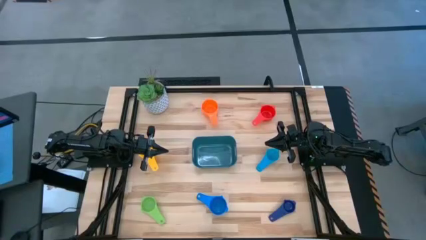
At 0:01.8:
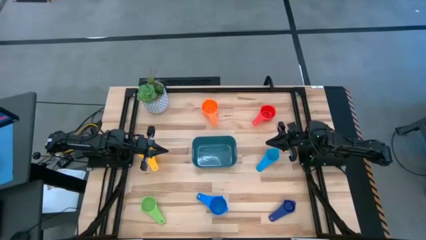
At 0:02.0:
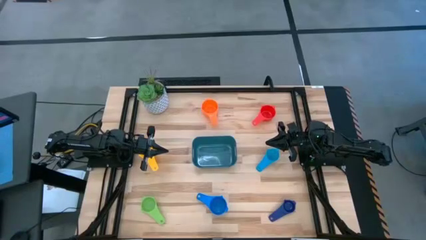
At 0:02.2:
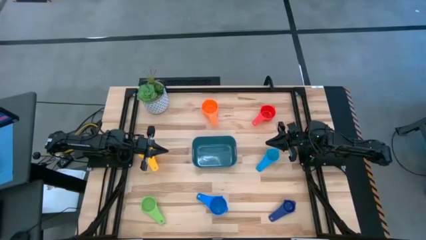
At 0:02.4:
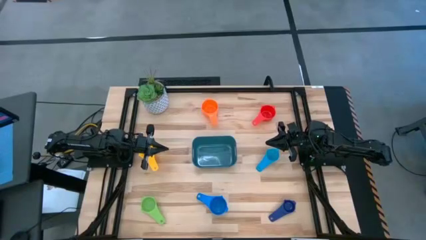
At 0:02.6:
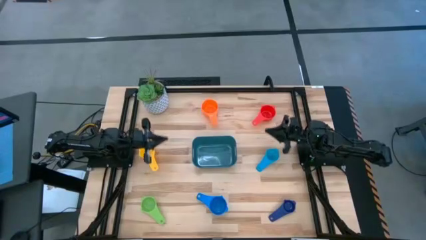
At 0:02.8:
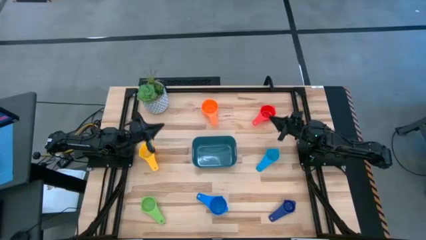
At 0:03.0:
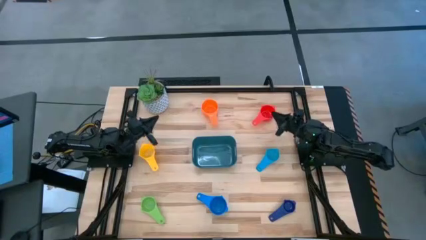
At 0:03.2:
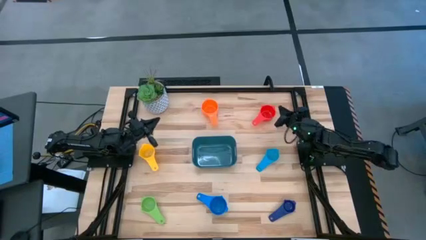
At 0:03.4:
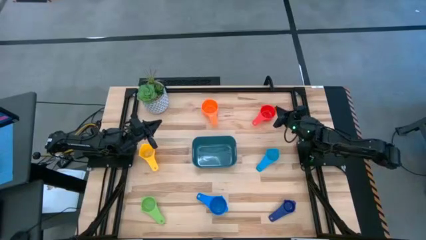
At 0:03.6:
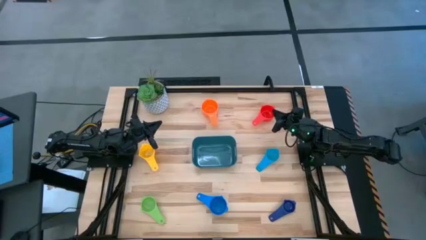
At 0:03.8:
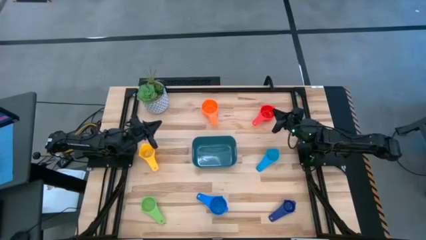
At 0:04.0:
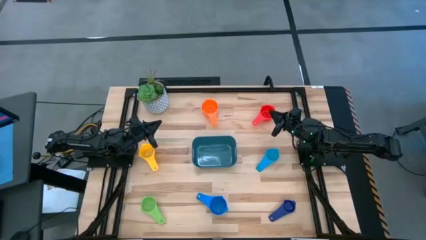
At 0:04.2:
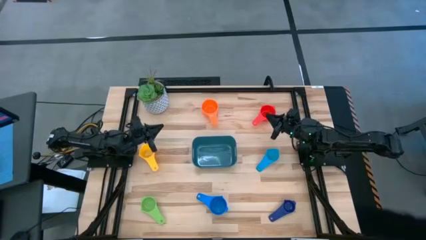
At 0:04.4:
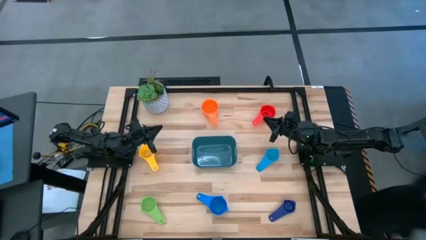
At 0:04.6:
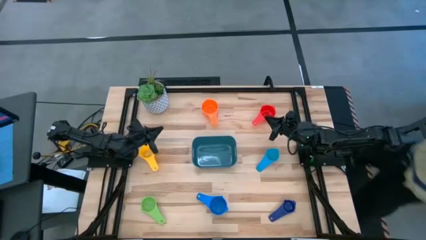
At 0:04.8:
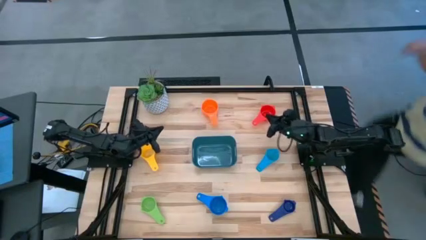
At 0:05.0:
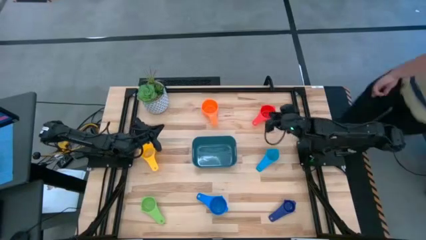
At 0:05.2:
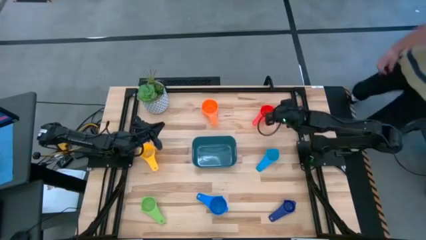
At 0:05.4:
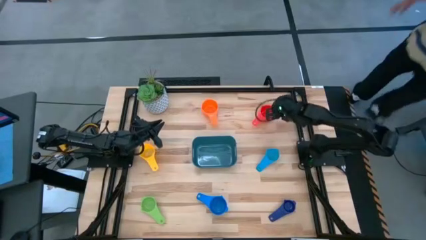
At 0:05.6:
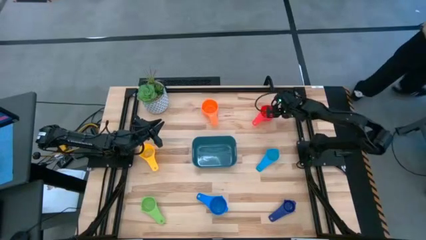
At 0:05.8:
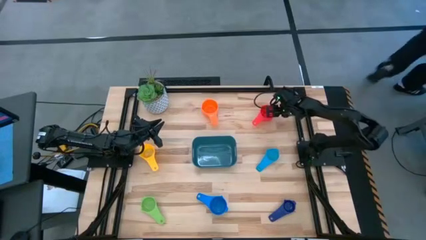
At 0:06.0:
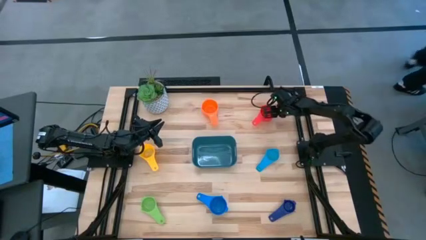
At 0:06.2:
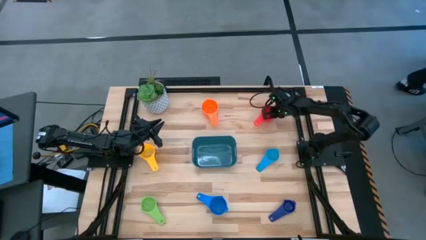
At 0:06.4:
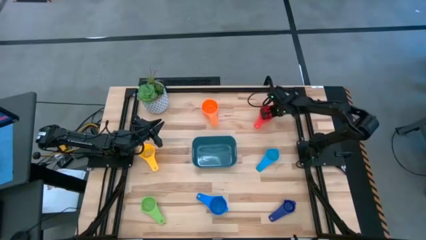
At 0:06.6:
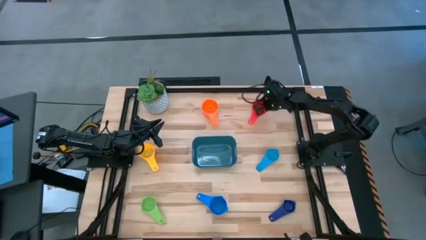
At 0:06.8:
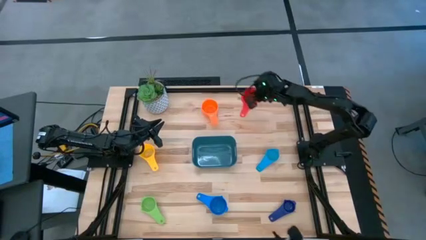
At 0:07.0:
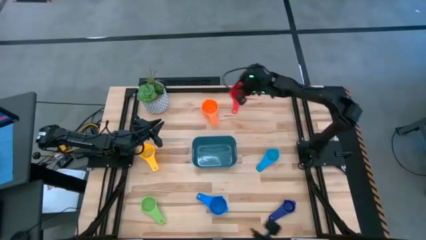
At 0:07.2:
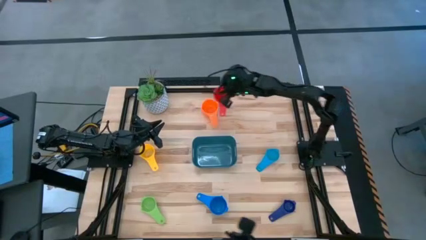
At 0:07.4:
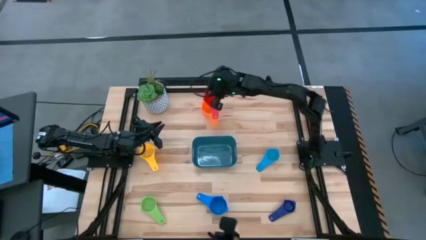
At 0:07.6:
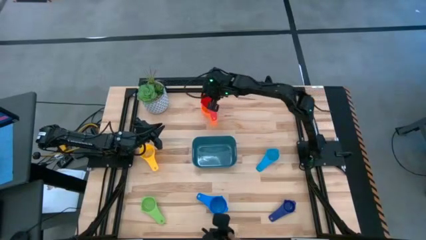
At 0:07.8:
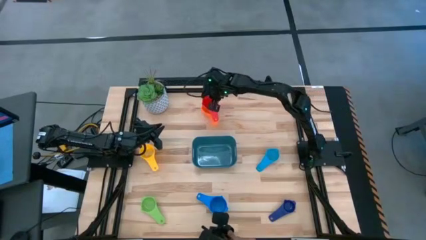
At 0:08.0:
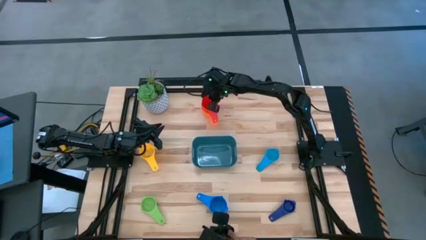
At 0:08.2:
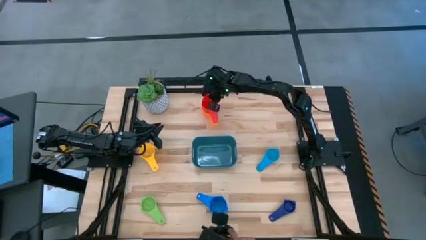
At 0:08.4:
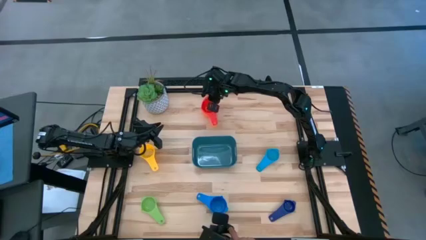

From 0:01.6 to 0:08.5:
Task: Nest measuring cups in basket
Stack the red measuring cup on top of the orange measuring cup

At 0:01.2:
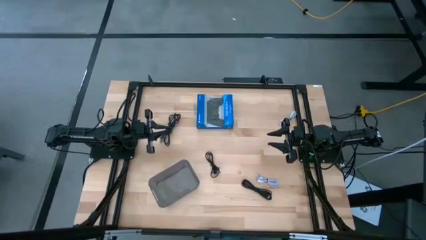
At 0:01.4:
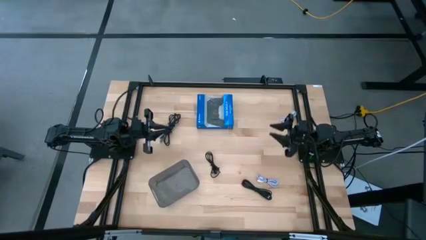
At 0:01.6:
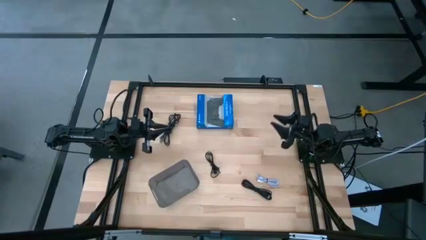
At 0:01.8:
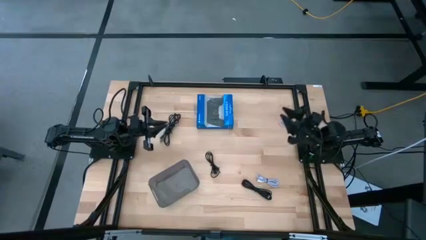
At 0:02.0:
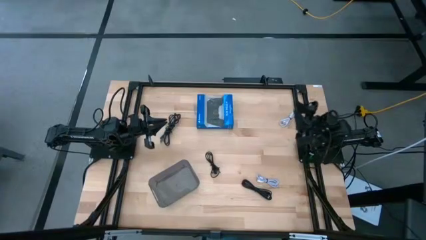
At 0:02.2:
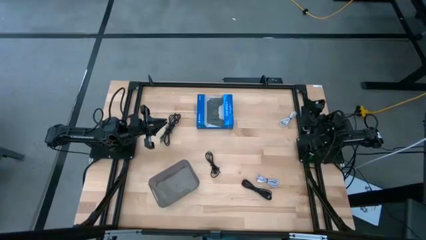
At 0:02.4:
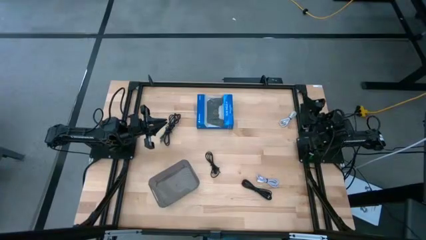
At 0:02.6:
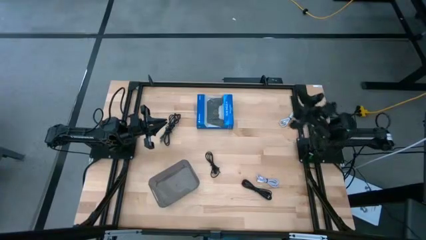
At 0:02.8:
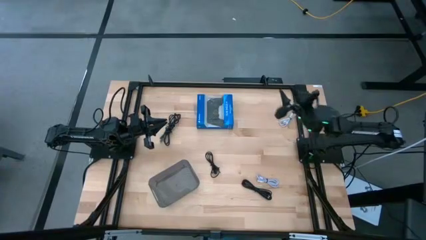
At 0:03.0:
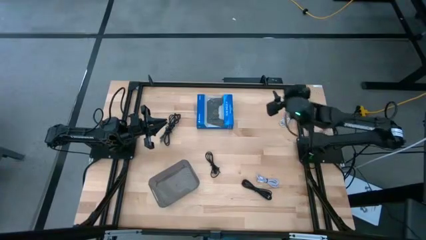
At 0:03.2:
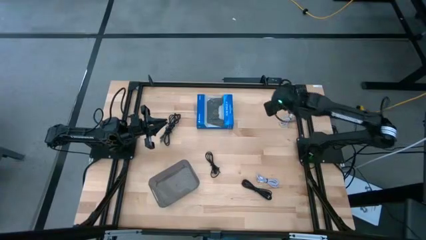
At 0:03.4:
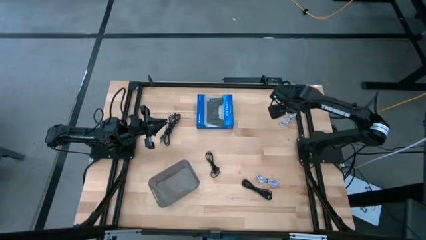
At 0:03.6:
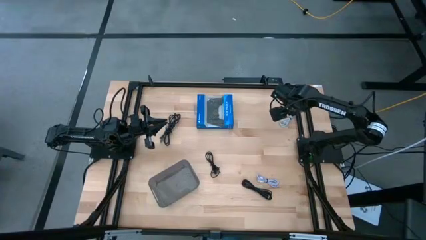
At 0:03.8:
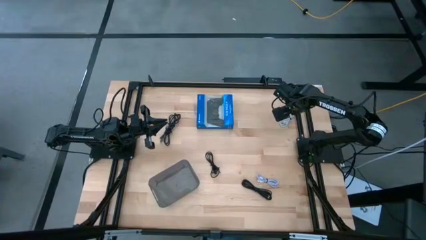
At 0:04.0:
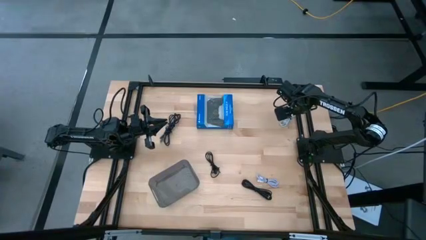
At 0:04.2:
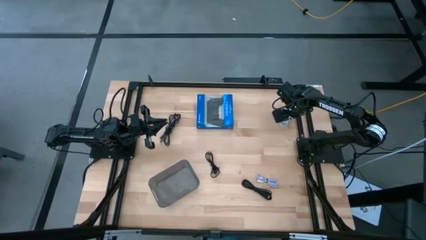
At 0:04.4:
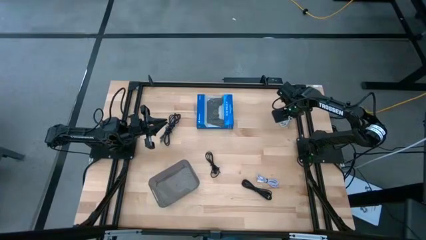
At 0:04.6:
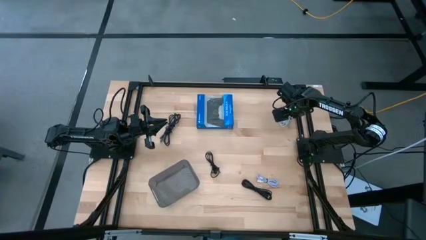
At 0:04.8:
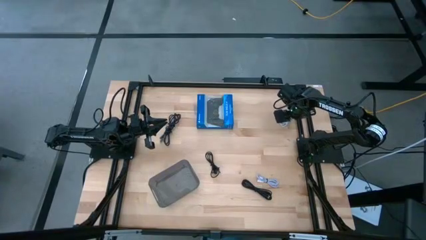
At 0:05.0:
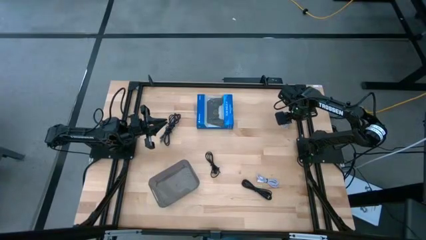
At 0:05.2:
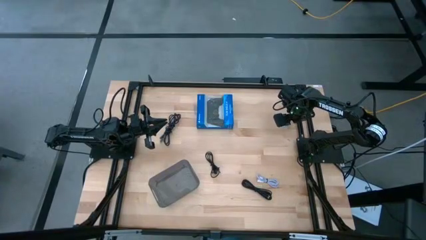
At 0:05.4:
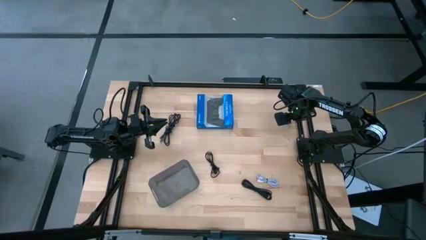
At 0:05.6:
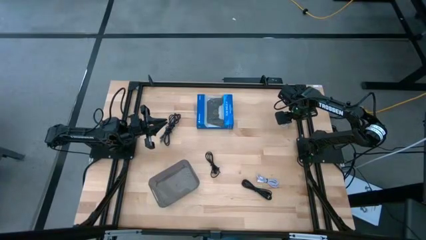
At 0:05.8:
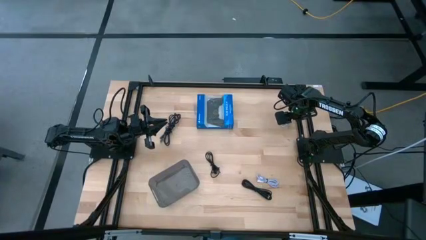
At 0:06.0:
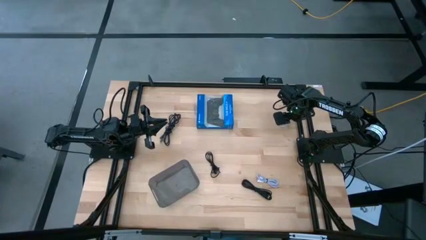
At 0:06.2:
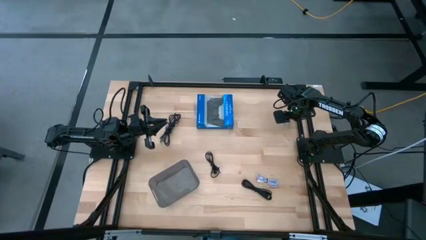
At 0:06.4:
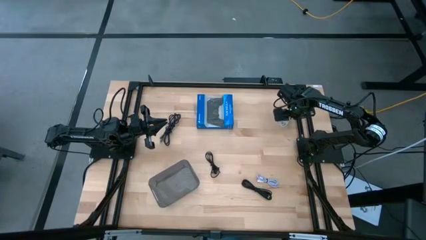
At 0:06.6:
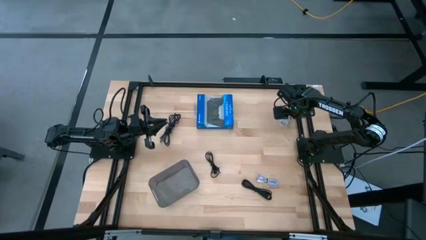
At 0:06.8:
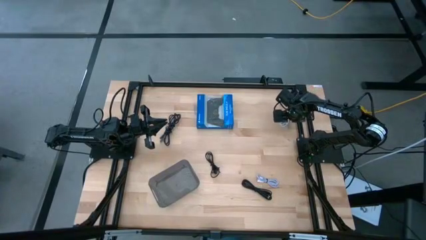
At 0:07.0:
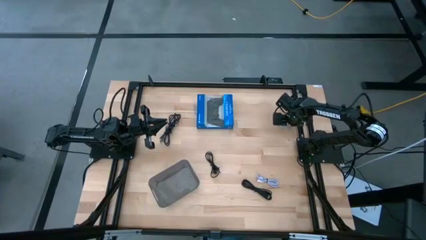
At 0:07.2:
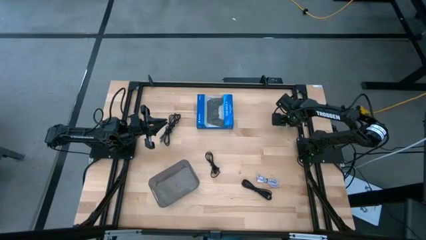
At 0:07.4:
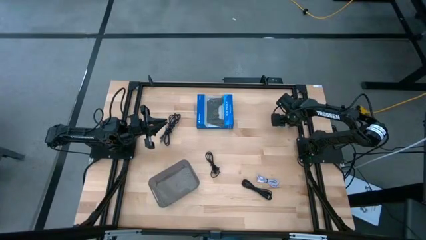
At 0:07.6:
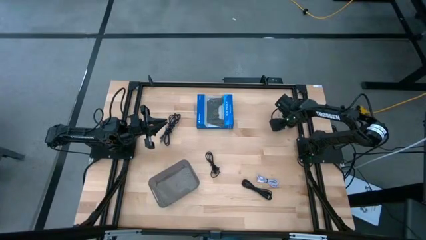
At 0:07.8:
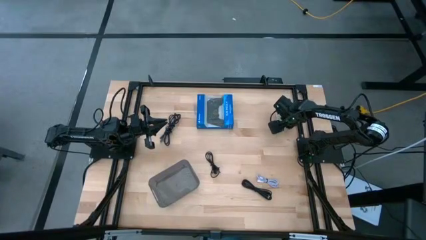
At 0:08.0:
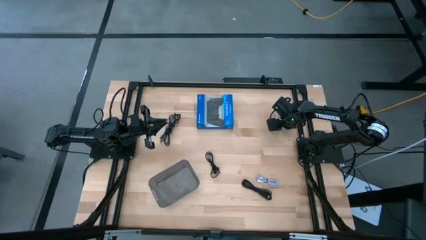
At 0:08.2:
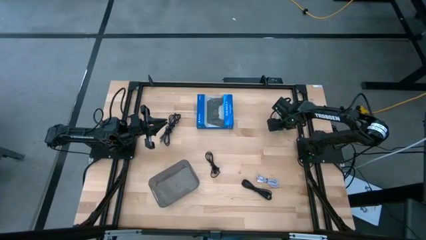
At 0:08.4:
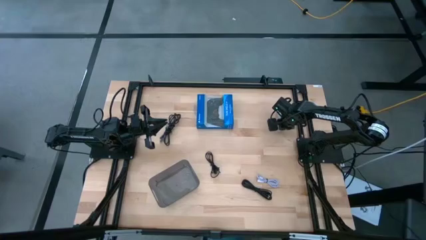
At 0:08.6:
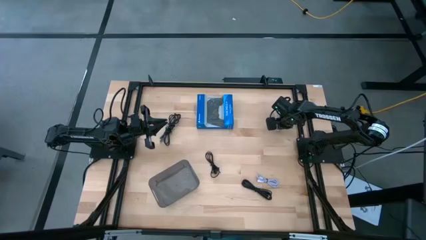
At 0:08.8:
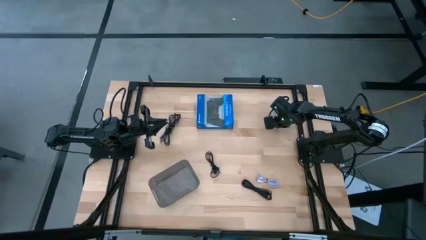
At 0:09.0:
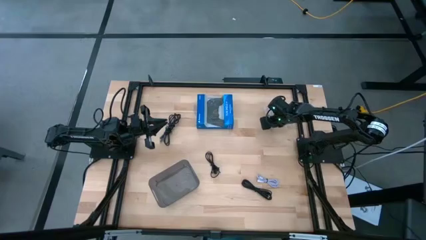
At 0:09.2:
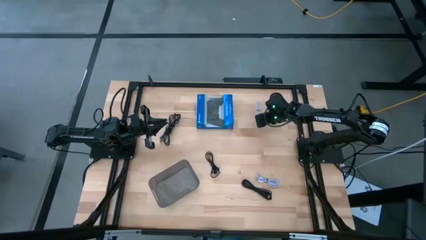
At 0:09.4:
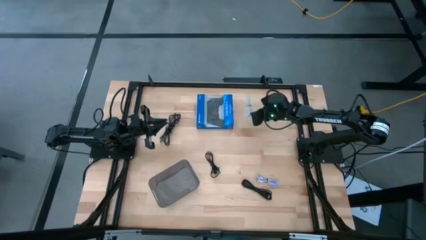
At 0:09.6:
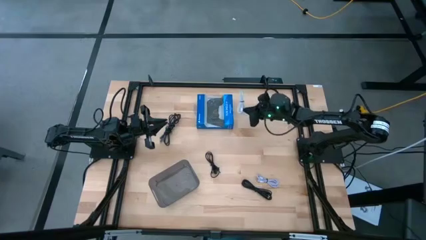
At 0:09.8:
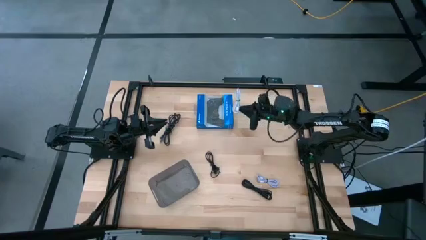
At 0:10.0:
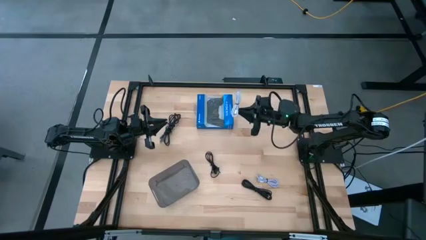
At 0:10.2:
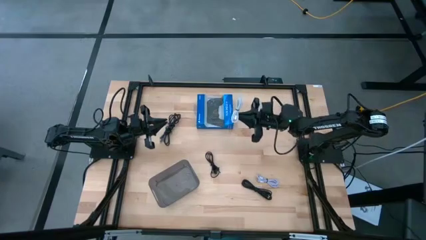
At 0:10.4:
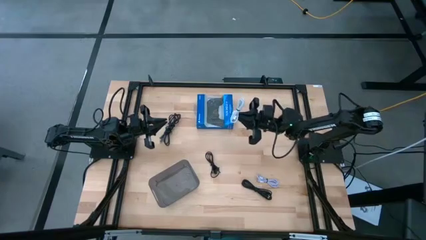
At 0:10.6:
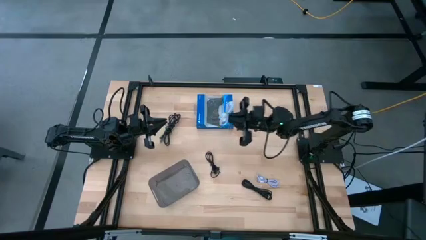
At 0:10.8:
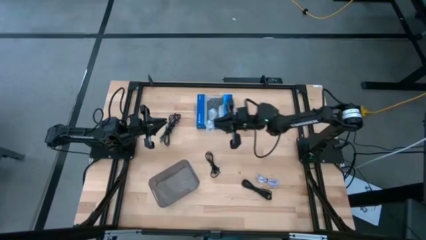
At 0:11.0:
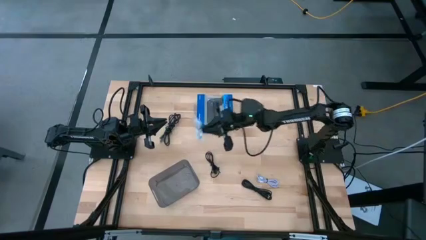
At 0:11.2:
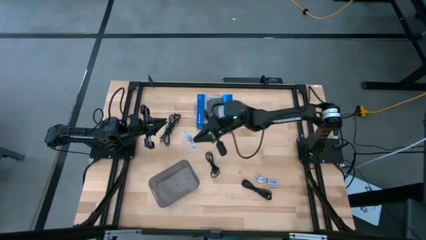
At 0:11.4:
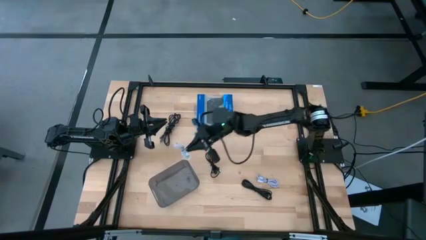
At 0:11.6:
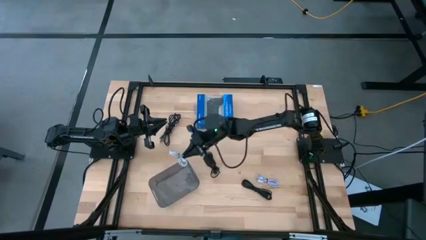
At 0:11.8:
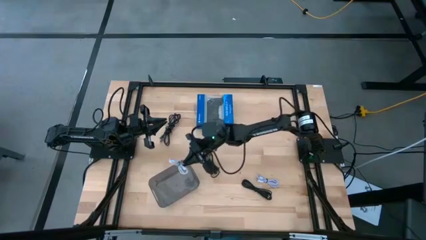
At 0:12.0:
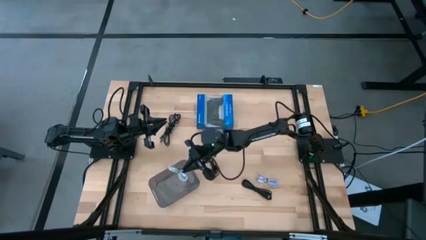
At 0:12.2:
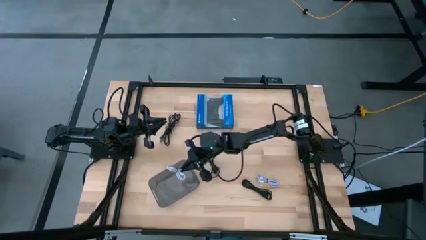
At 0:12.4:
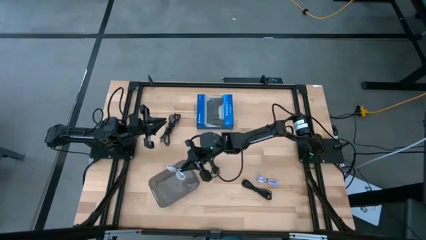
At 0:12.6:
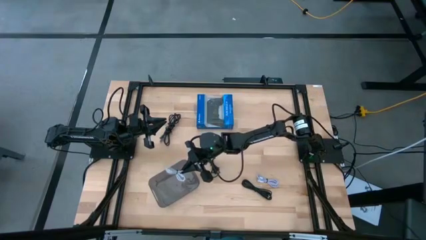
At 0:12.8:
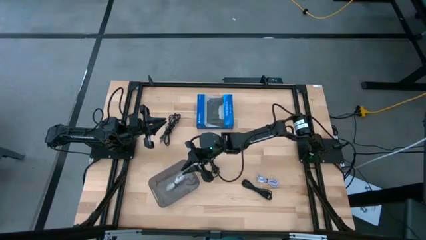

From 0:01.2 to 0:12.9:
Task: Pick and place USB-C Cables
Put the white charger cable into the black bin
